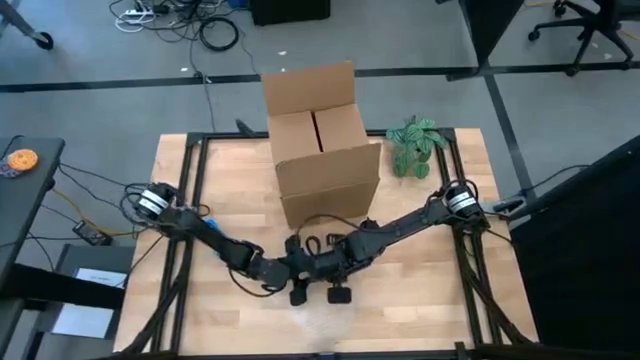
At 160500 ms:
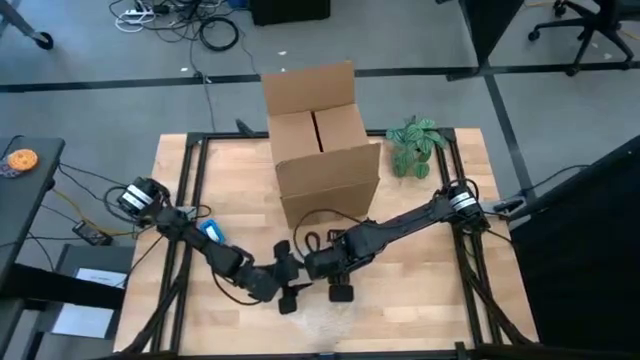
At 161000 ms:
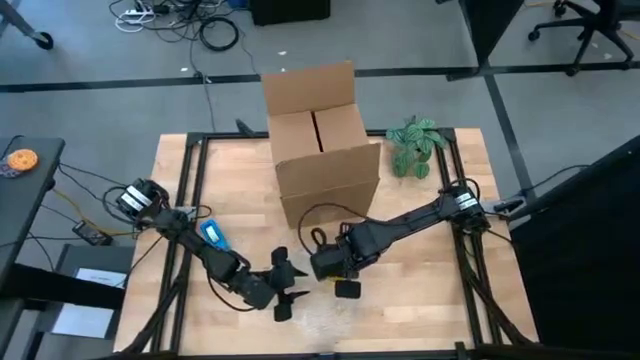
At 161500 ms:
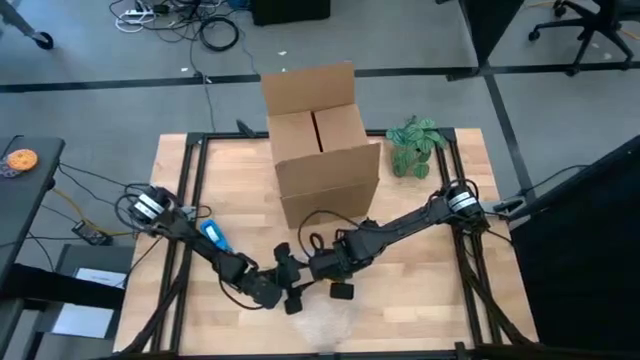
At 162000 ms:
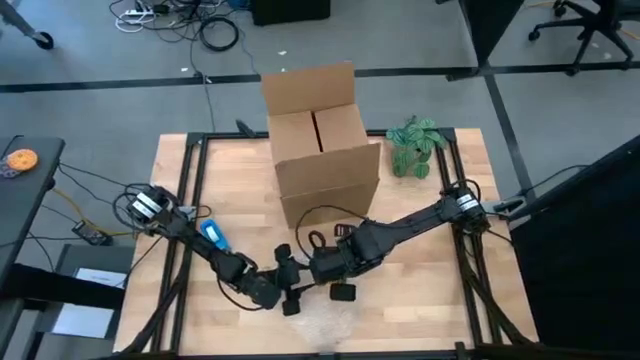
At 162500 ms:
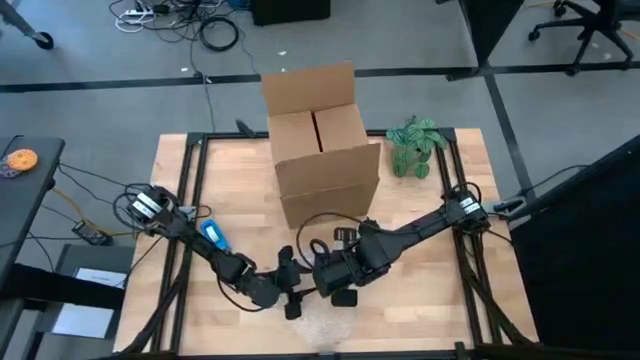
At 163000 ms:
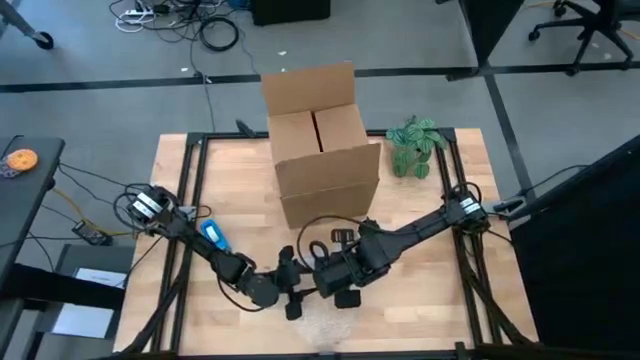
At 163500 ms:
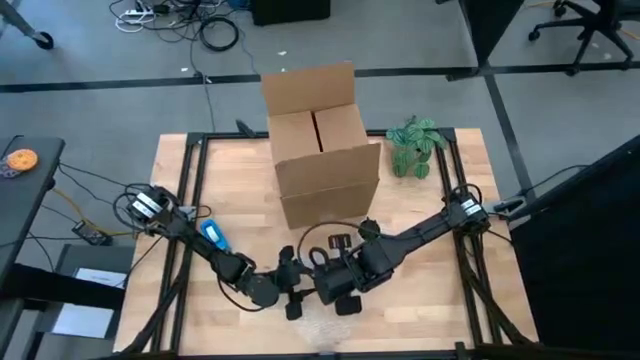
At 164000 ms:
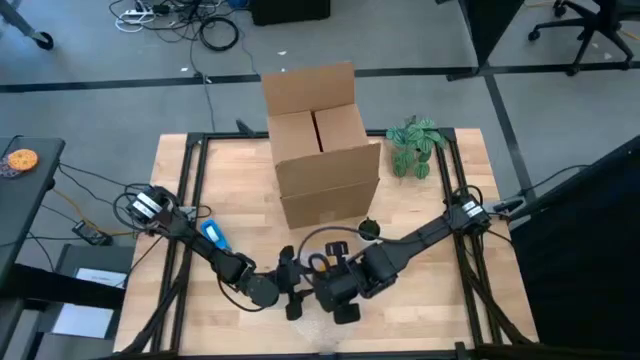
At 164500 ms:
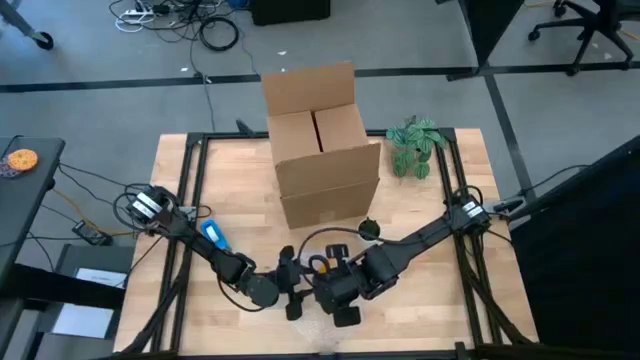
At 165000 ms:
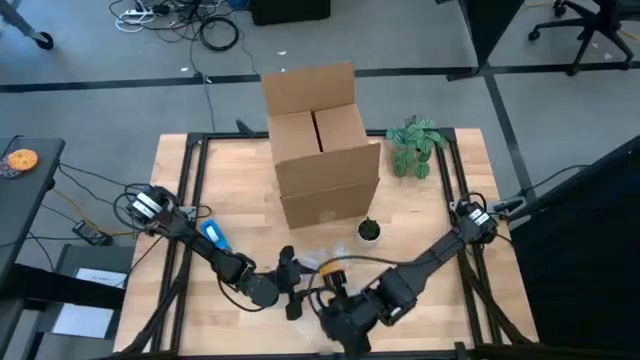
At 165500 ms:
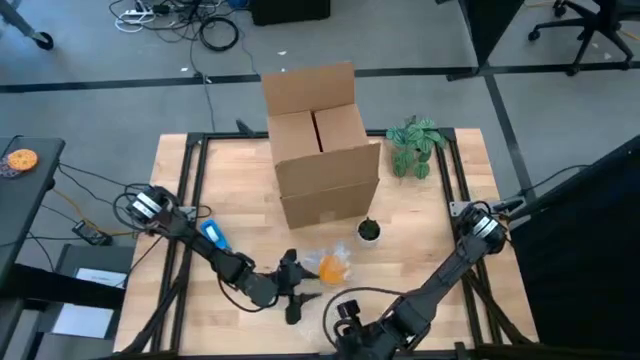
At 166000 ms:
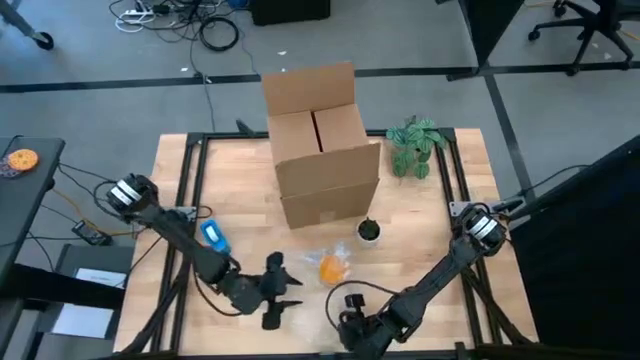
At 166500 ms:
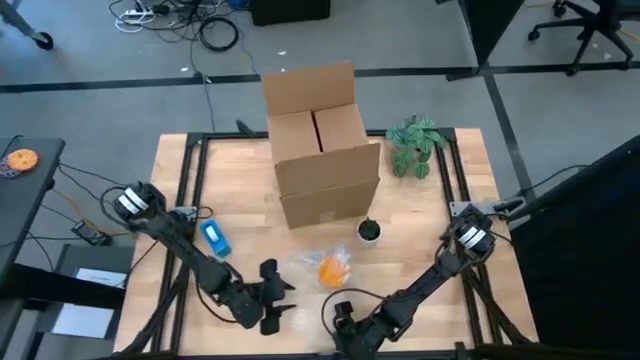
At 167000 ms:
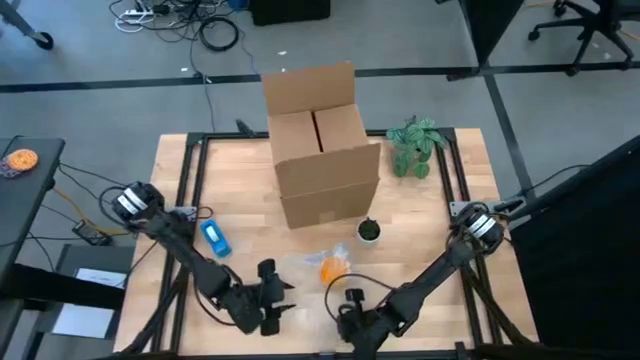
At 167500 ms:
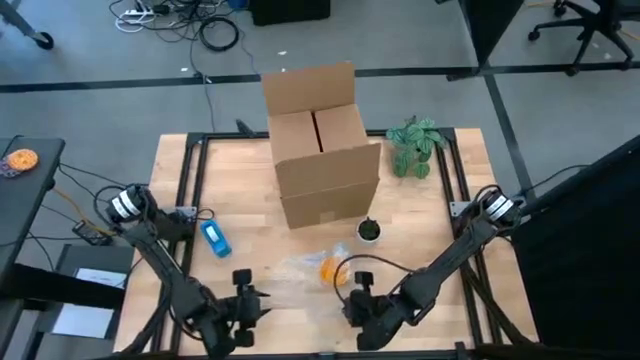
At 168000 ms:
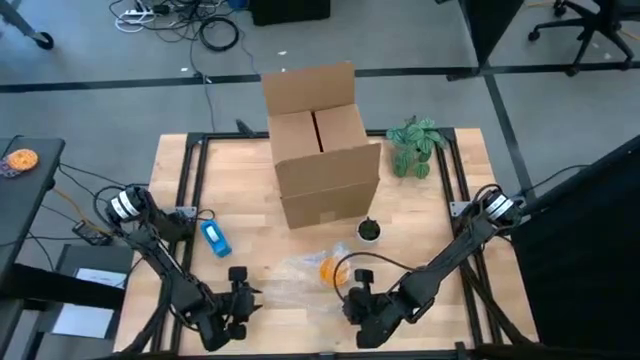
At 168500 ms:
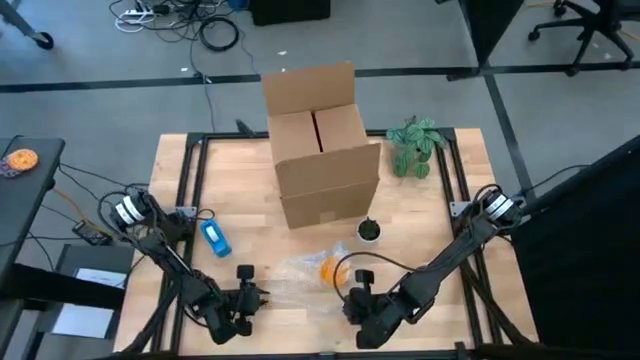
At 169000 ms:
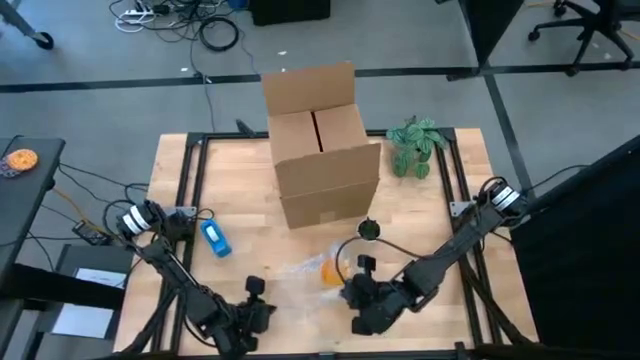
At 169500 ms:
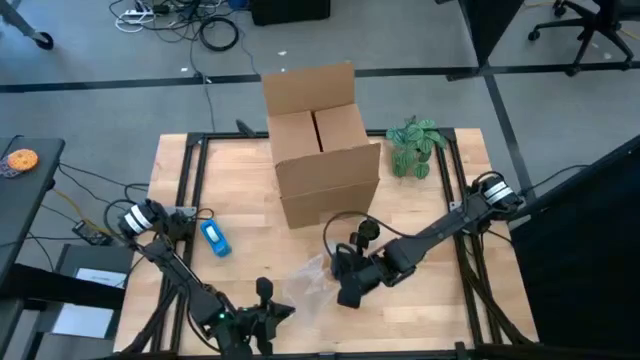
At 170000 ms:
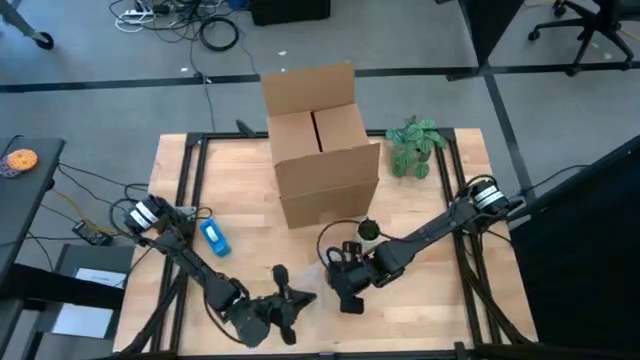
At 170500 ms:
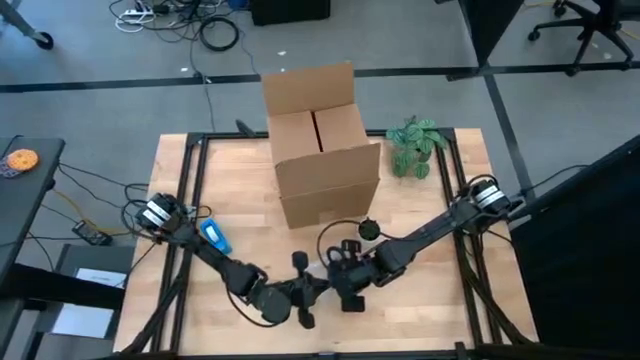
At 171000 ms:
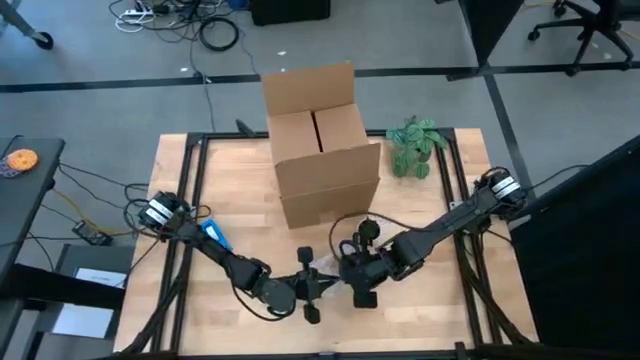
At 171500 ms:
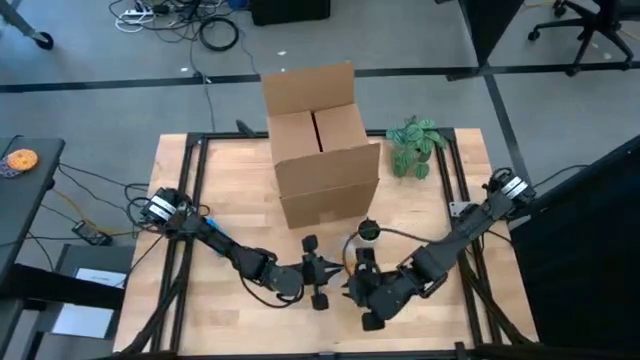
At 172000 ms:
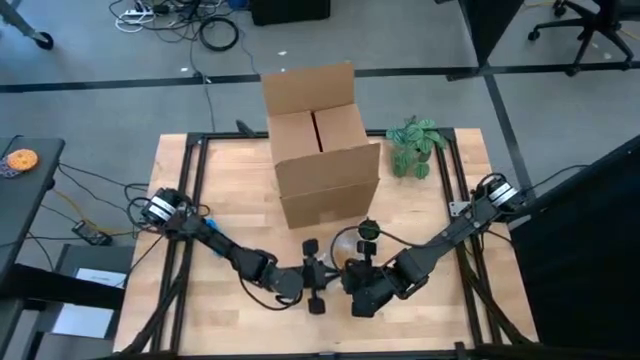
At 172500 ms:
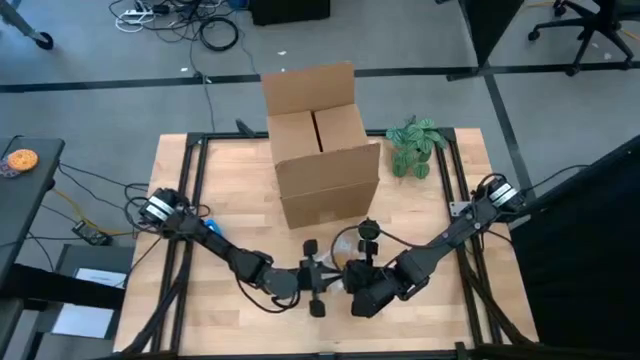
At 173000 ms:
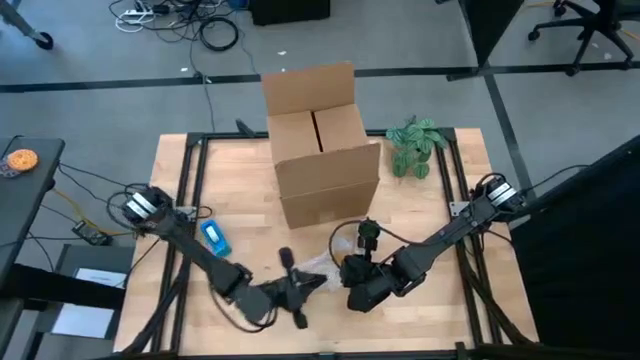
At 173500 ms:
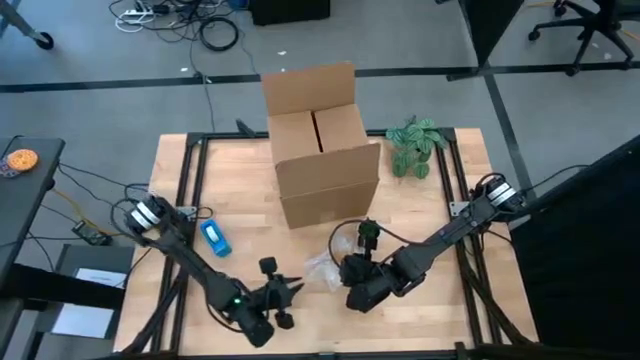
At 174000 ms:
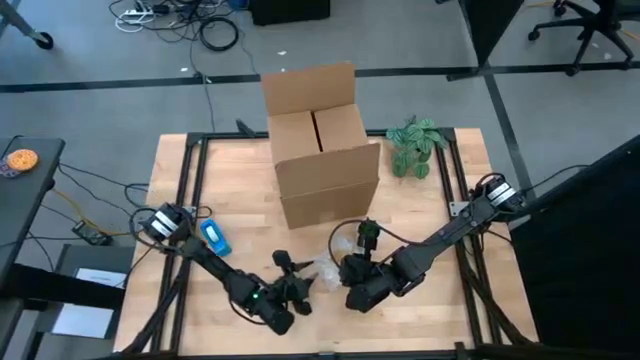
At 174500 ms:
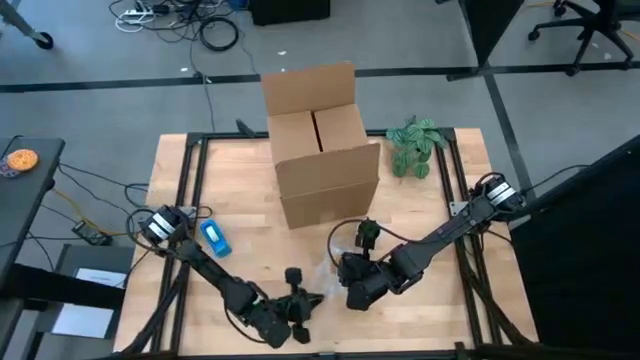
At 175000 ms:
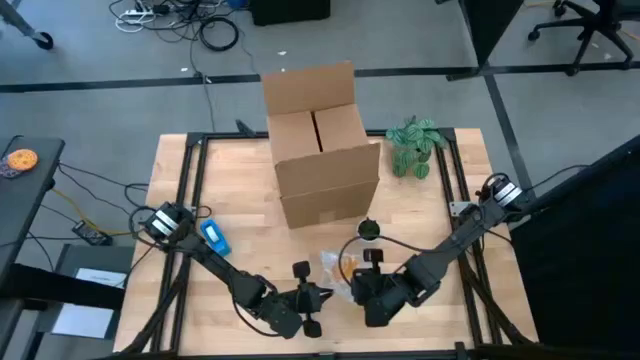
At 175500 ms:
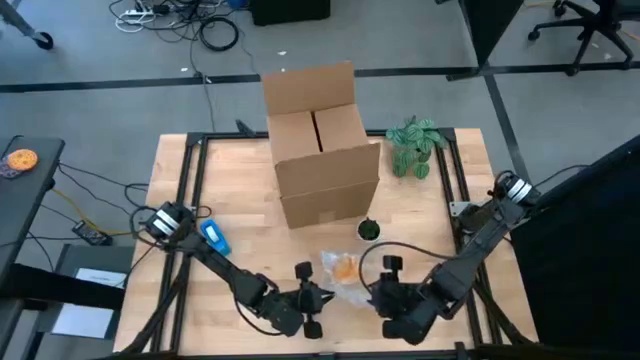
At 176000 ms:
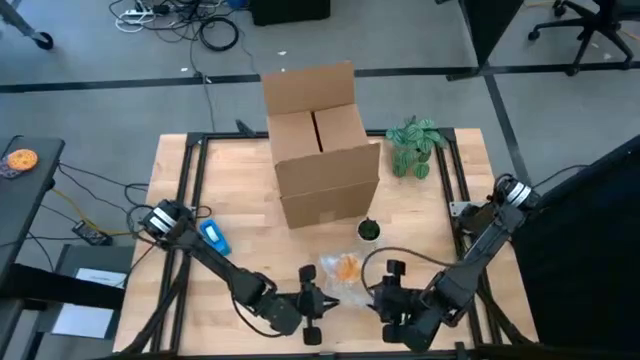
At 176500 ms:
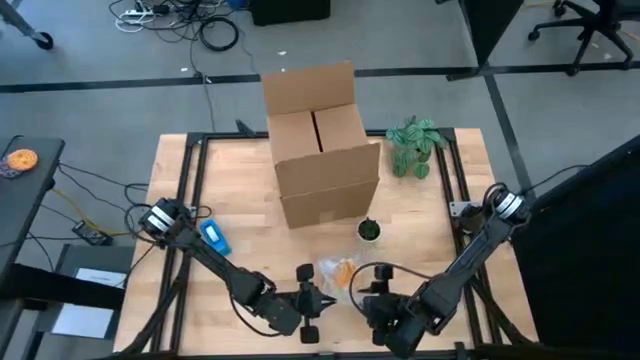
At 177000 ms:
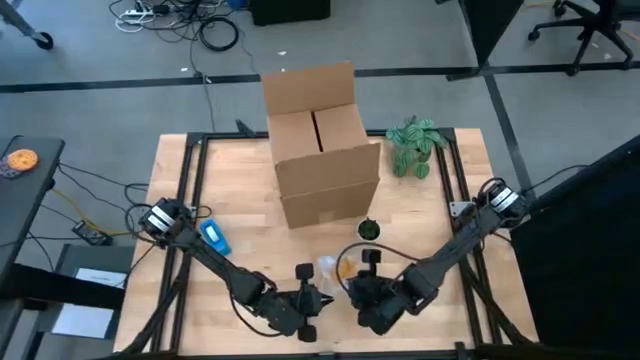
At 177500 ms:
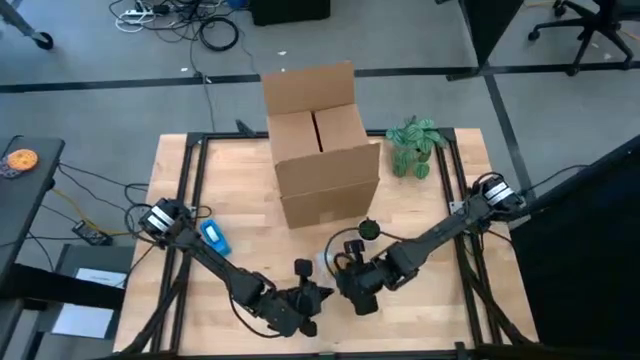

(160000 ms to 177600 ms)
Task: wrap mug
Wrap the yellow mug with the transparent bubble wrap
